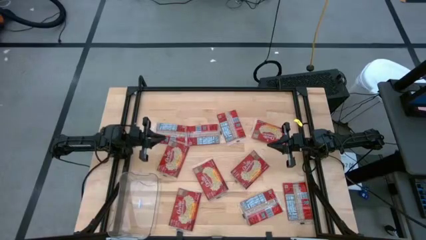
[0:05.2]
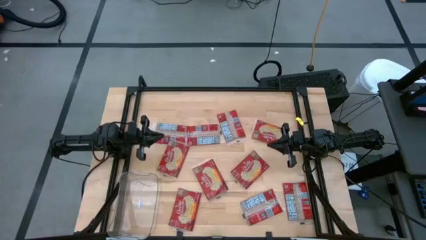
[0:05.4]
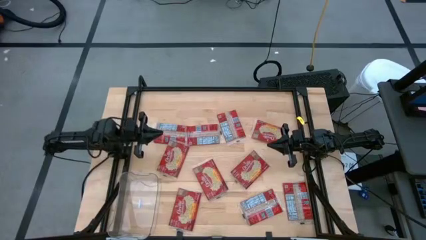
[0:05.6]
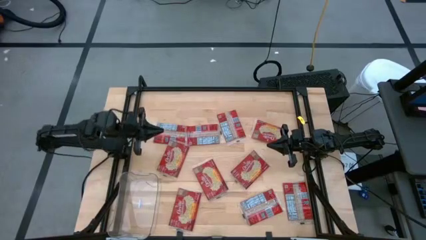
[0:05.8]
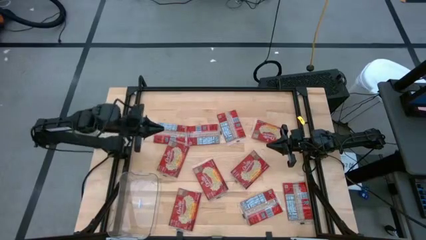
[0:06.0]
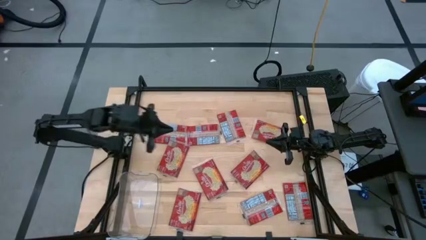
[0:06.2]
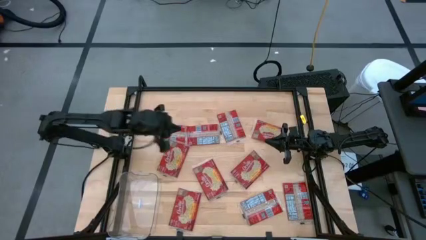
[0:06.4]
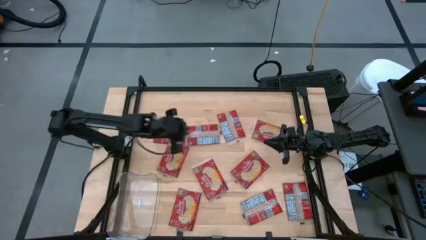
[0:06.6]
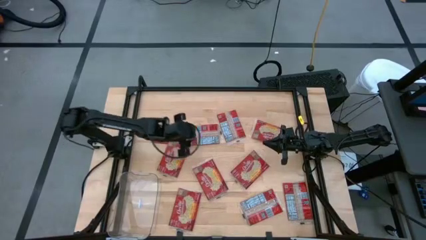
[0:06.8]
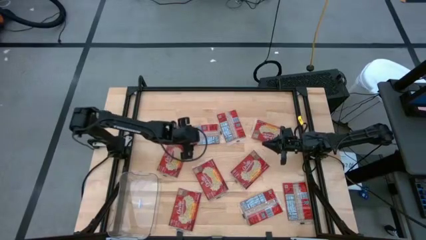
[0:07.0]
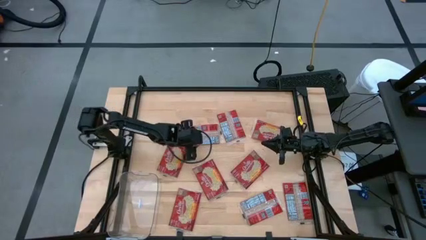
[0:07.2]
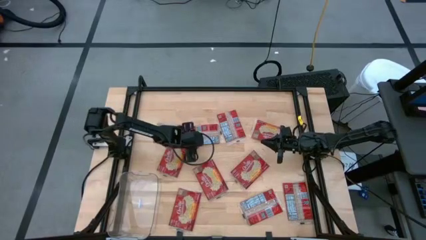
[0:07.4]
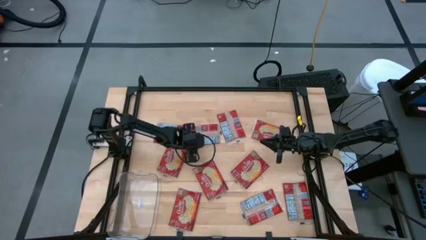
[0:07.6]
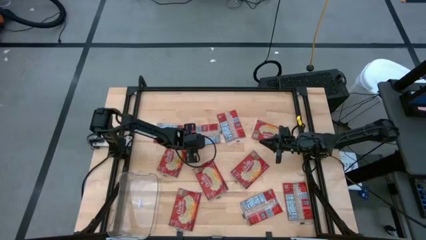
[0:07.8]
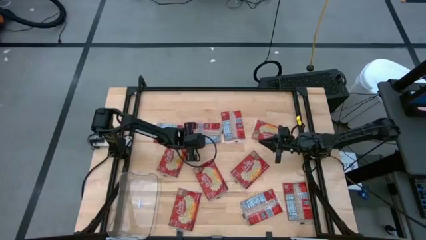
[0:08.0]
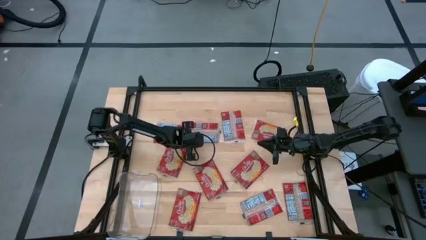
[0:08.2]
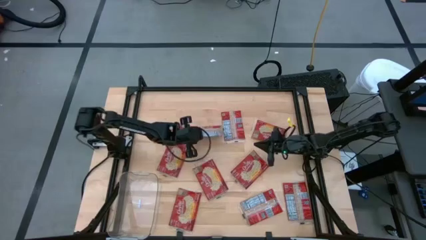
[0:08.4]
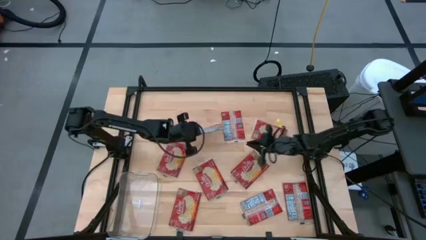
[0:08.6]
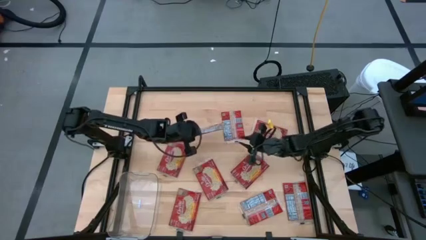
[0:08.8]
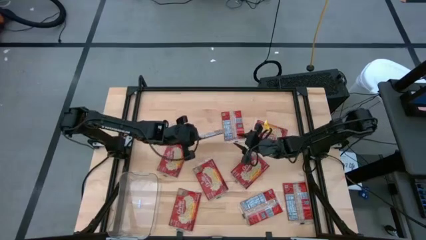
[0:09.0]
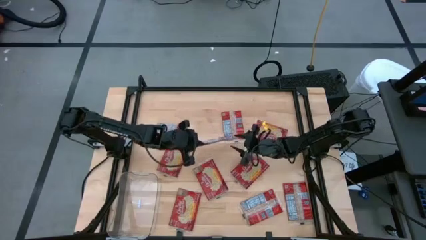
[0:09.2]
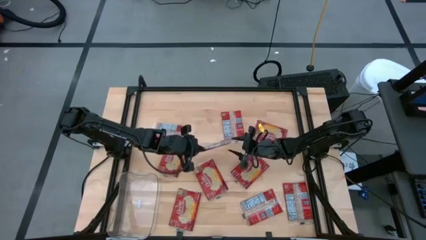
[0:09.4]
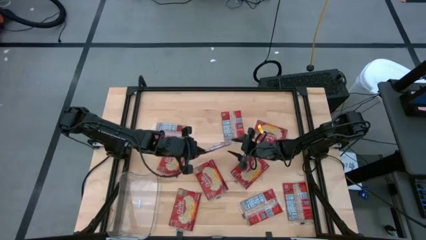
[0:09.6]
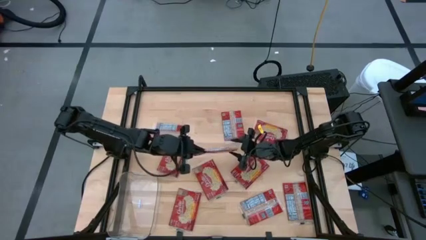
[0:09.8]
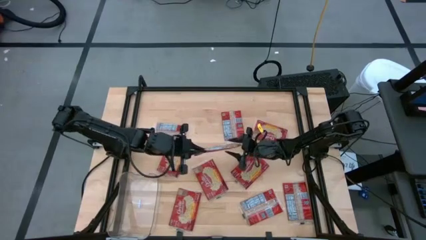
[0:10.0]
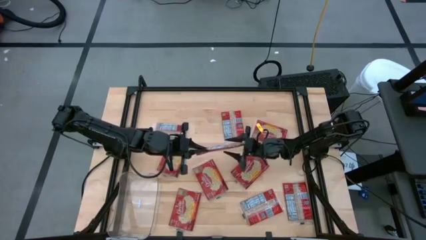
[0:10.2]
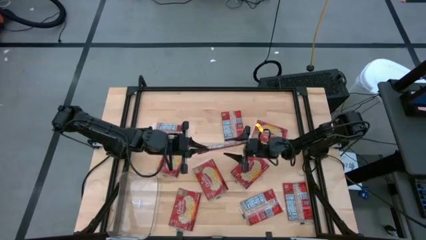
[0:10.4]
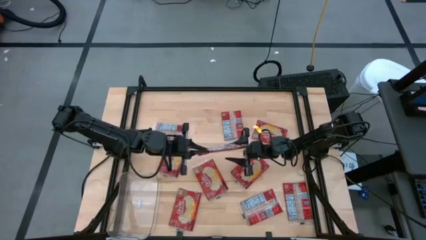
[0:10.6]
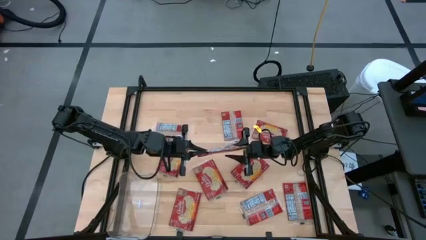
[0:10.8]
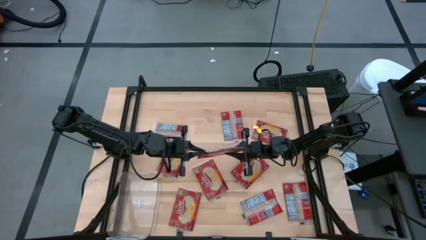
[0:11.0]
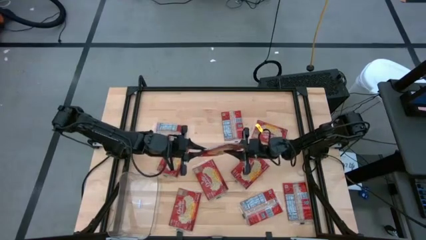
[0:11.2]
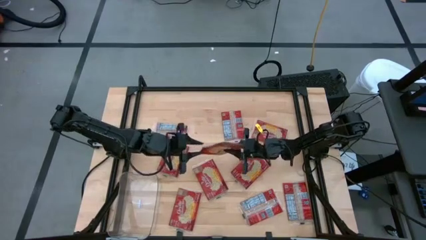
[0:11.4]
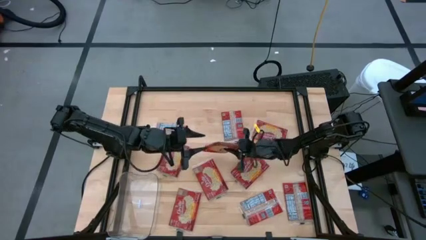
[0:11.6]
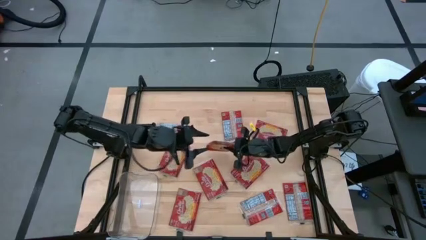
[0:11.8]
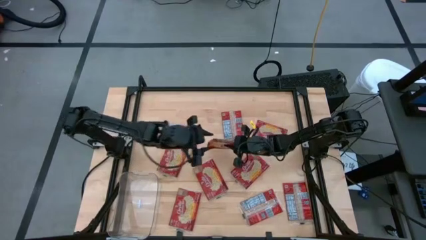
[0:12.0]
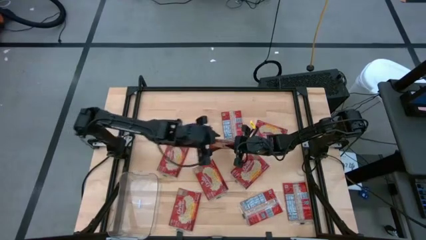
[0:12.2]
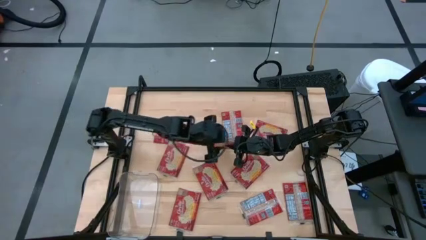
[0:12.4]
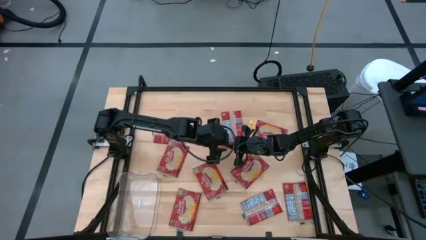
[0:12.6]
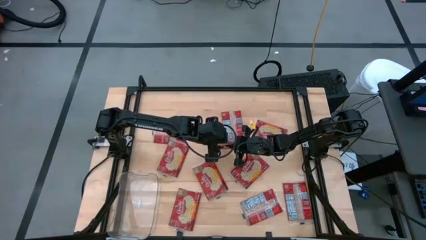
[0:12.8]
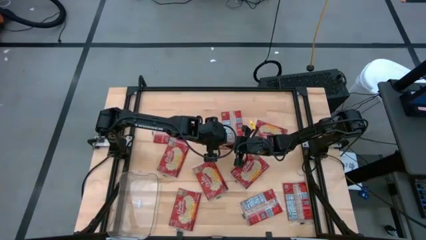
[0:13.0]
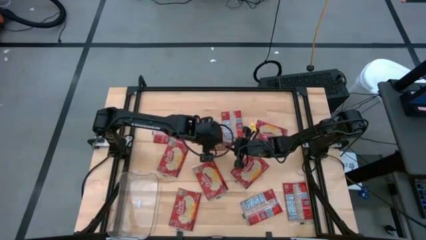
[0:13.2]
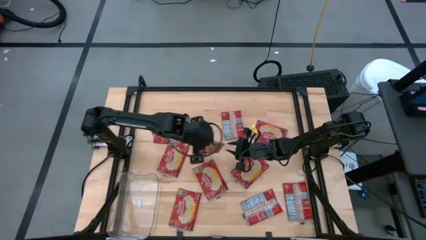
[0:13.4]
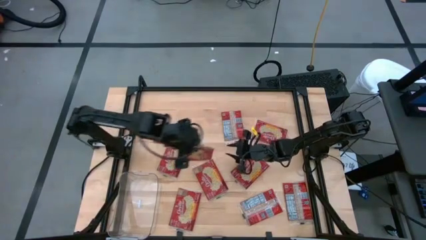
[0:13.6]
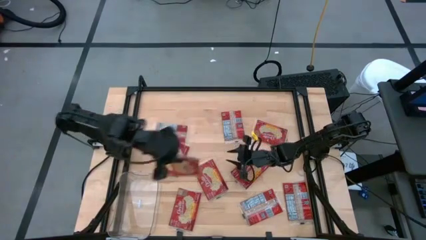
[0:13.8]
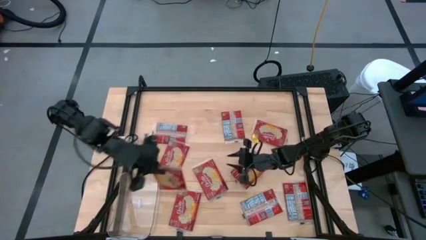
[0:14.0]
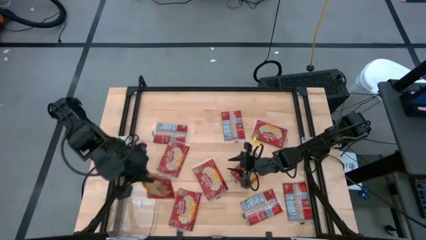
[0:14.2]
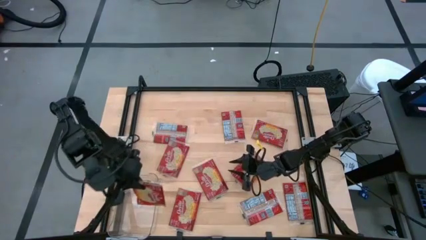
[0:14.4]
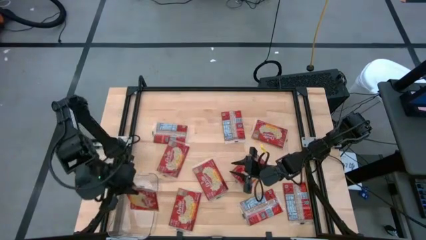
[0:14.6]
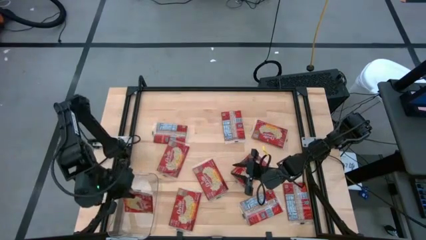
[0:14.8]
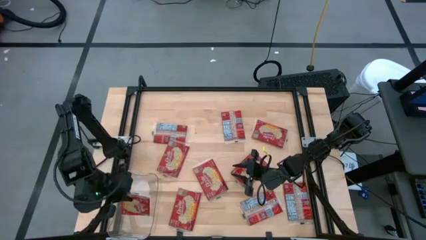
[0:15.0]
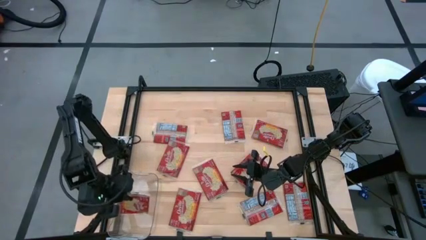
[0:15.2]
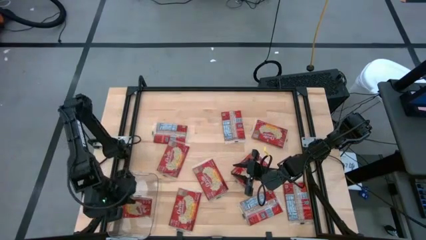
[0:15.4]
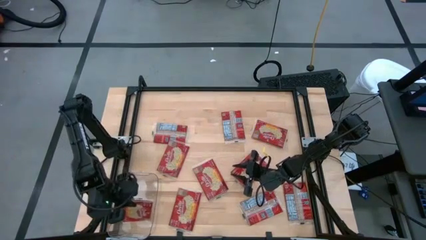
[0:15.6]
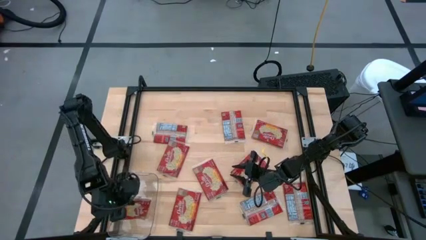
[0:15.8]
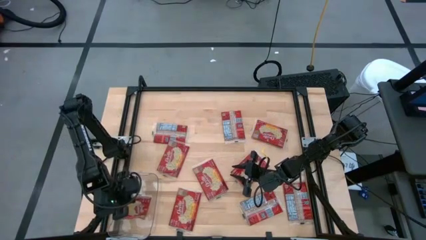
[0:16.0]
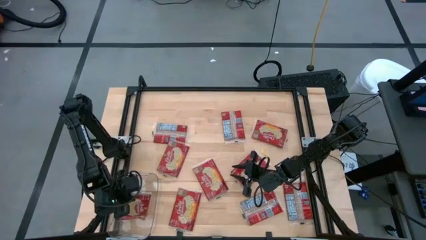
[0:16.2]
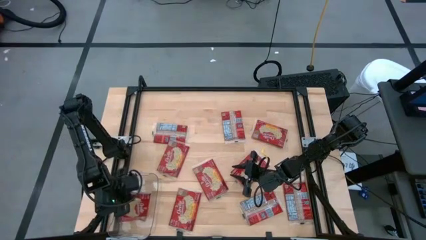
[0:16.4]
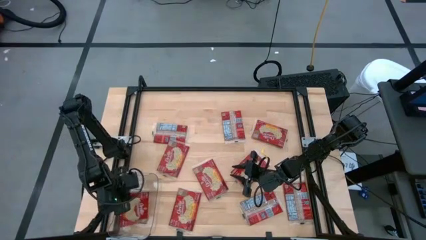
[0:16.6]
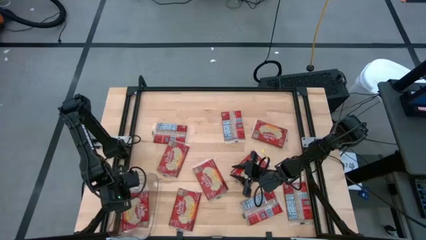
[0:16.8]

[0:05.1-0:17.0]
Task: Sort popcorn bags into baskets
Put the popcorn bag into the transparent bin

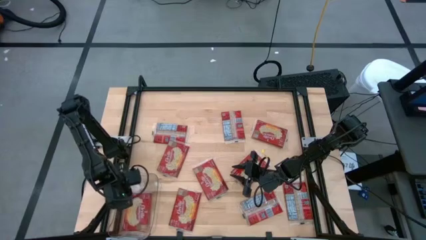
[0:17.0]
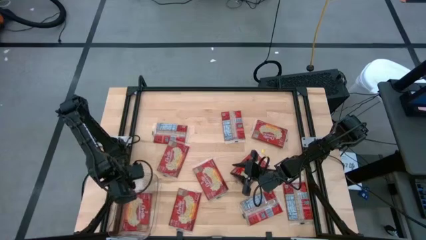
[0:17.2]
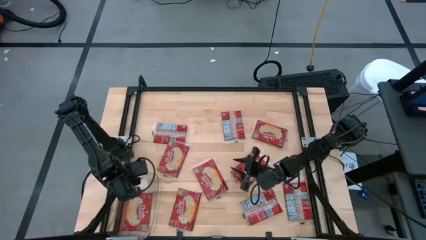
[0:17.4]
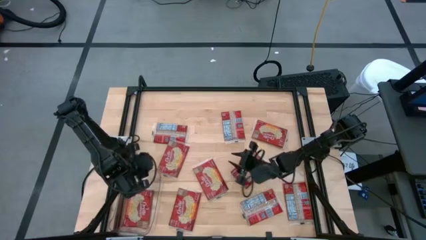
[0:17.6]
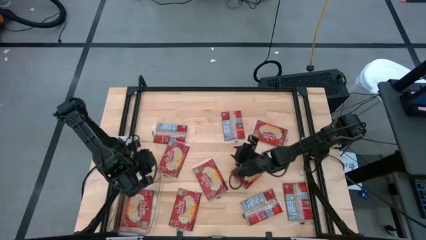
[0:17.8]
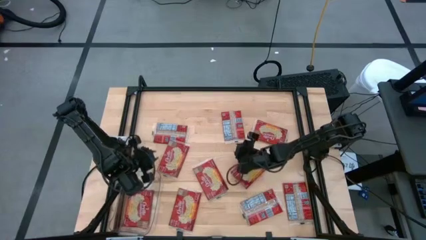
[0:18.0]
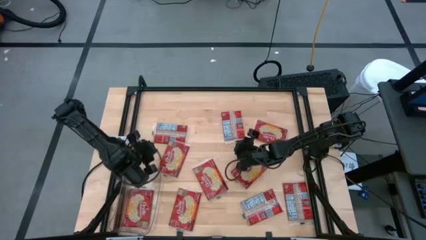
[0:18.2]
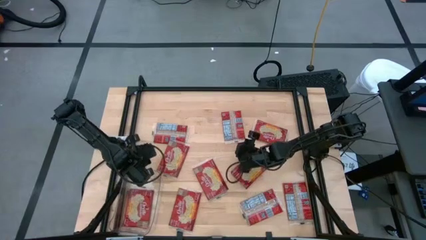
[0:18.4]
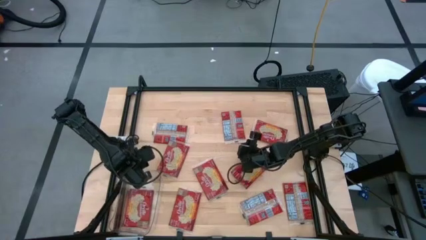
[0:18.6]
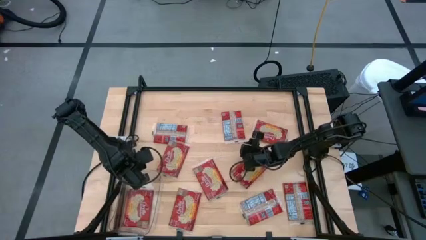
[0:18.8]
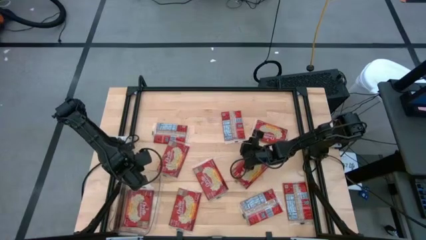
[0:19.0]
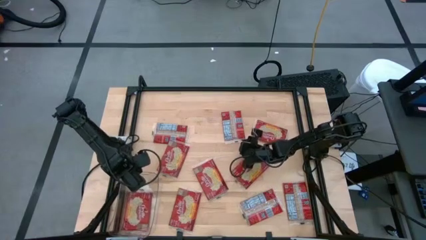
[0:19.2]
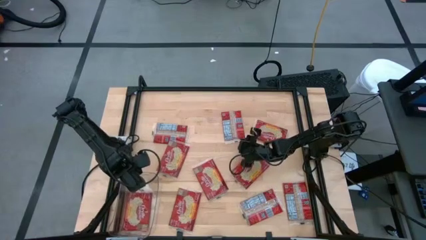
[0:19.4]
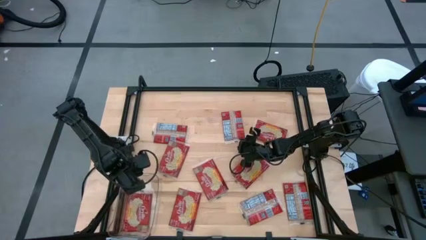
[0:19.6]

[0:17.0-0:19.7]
Adjust the transparent bin
